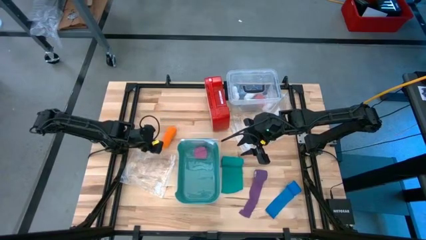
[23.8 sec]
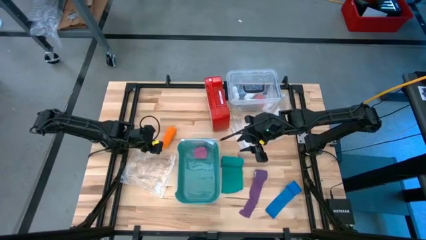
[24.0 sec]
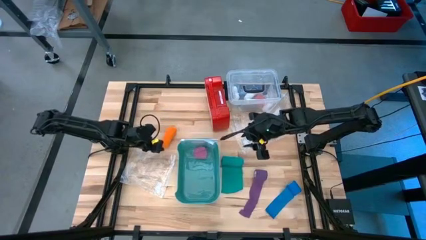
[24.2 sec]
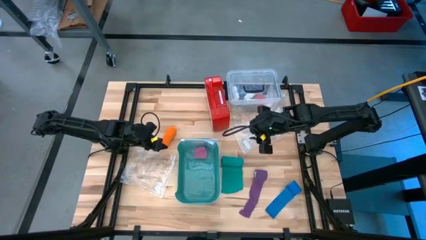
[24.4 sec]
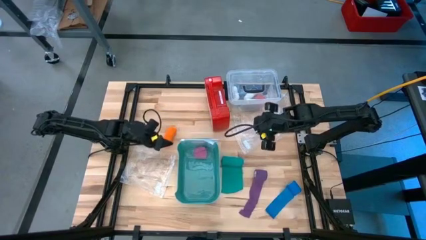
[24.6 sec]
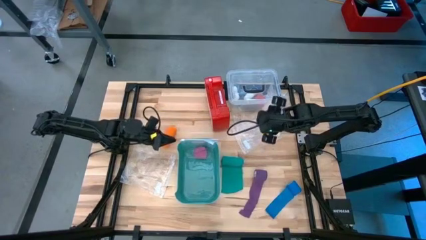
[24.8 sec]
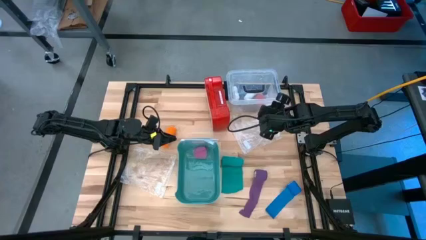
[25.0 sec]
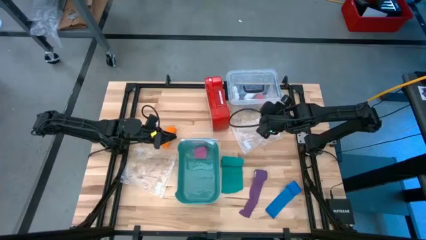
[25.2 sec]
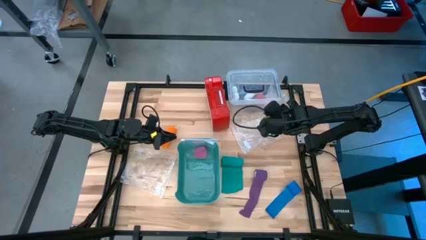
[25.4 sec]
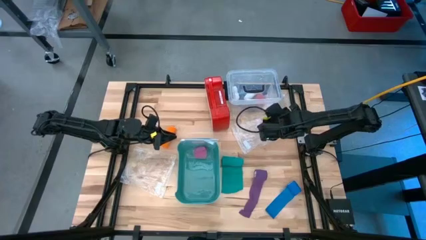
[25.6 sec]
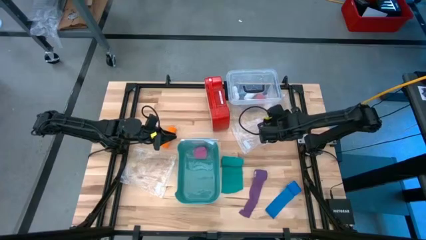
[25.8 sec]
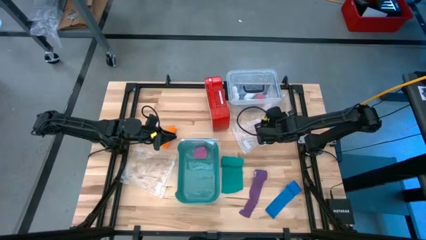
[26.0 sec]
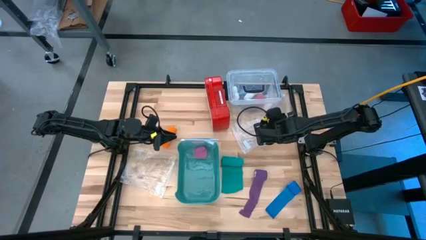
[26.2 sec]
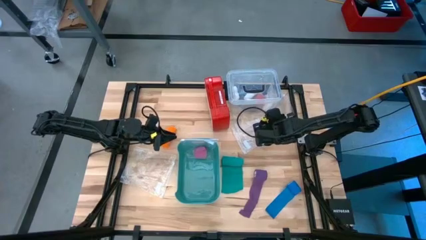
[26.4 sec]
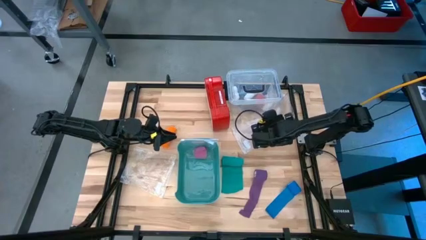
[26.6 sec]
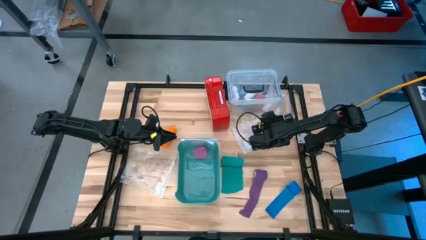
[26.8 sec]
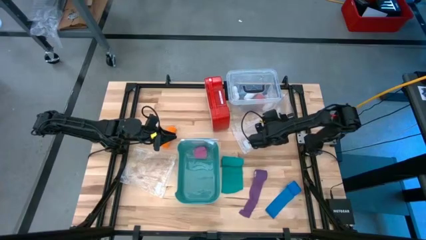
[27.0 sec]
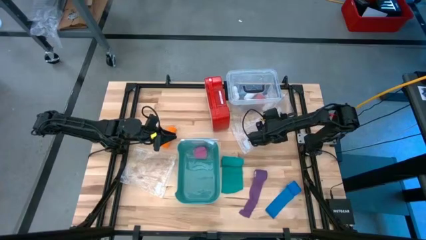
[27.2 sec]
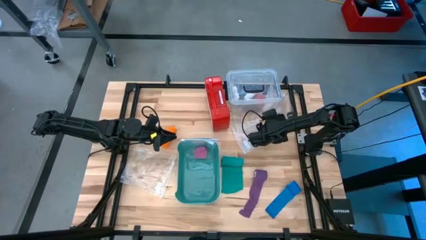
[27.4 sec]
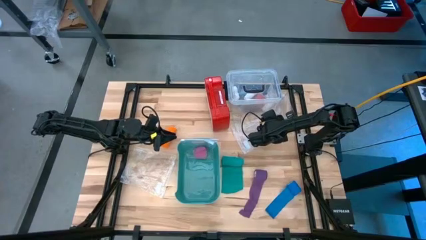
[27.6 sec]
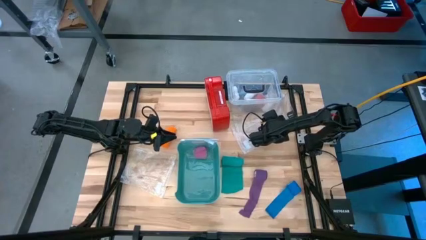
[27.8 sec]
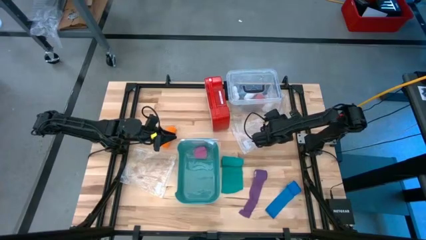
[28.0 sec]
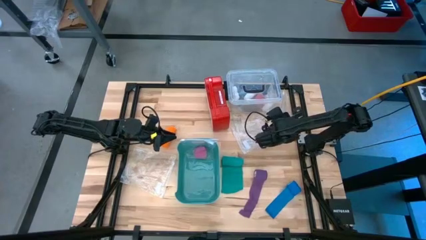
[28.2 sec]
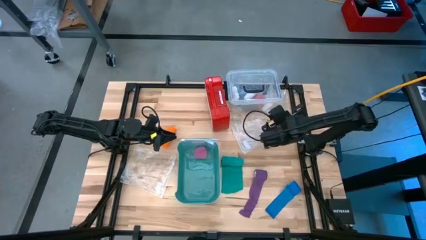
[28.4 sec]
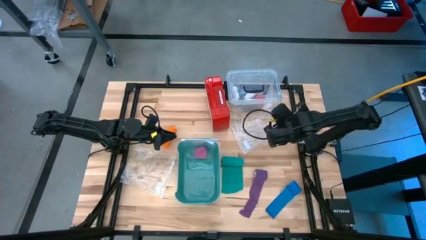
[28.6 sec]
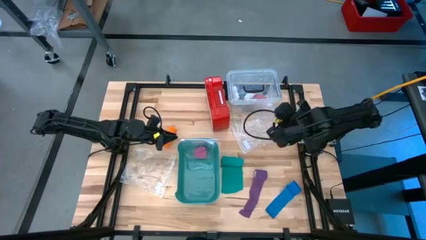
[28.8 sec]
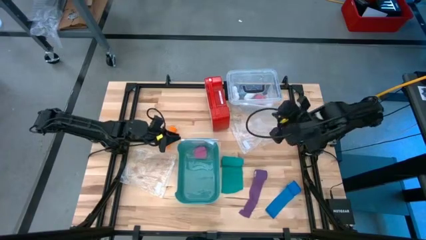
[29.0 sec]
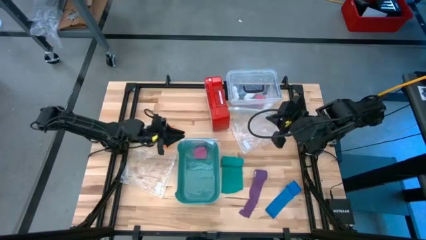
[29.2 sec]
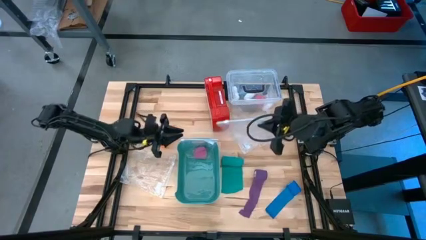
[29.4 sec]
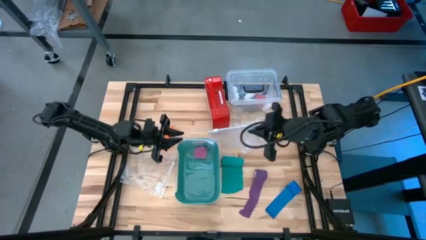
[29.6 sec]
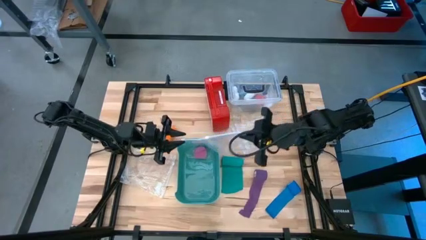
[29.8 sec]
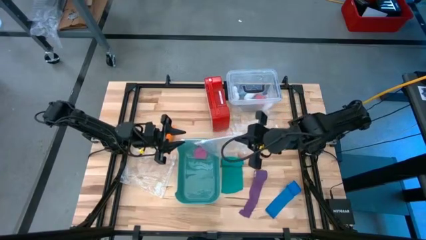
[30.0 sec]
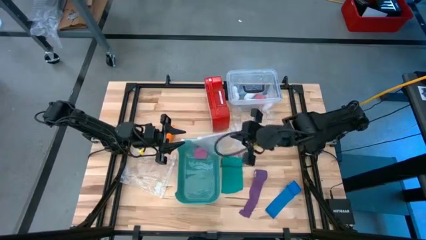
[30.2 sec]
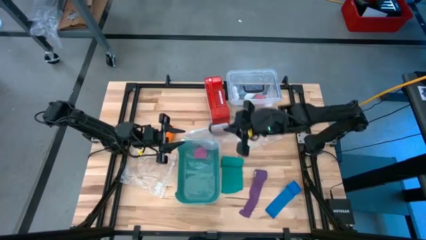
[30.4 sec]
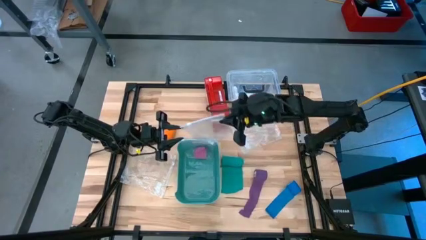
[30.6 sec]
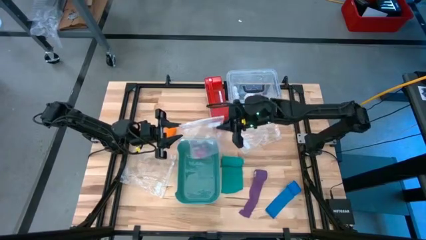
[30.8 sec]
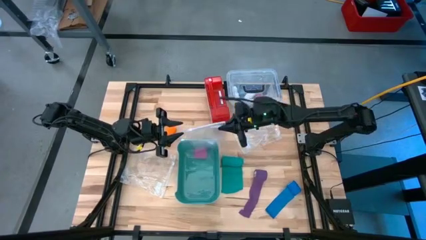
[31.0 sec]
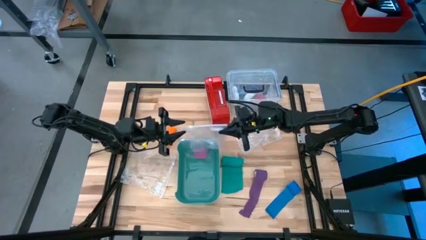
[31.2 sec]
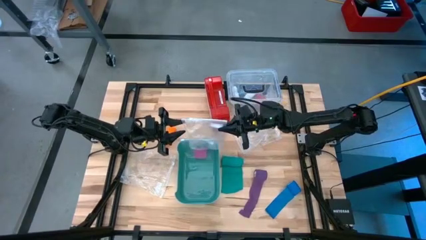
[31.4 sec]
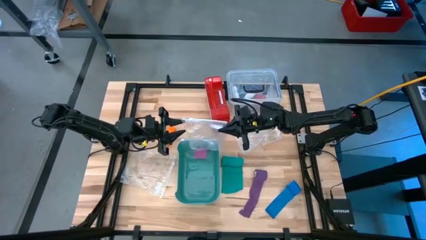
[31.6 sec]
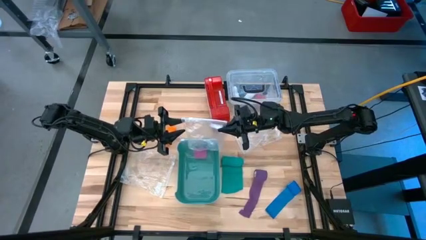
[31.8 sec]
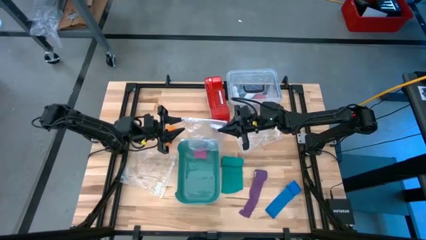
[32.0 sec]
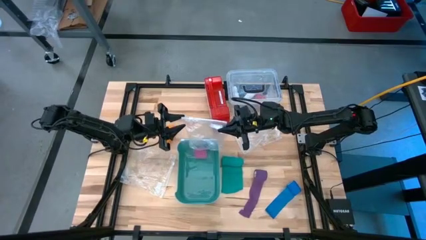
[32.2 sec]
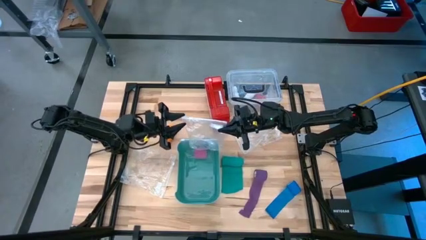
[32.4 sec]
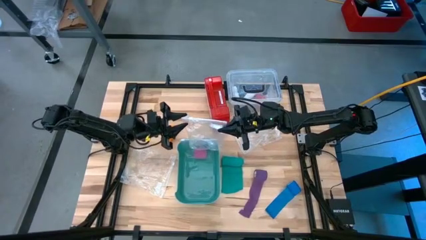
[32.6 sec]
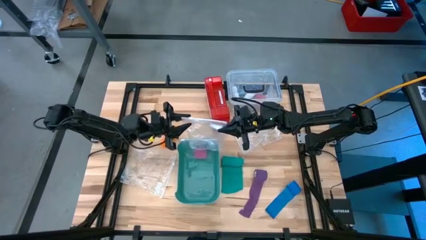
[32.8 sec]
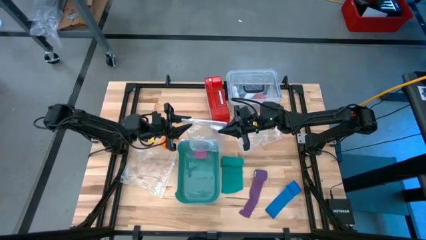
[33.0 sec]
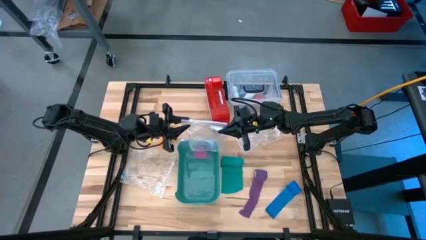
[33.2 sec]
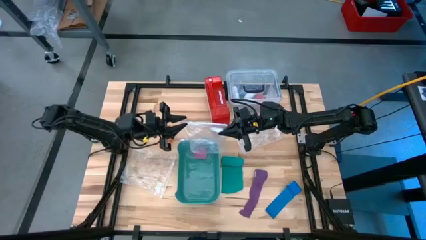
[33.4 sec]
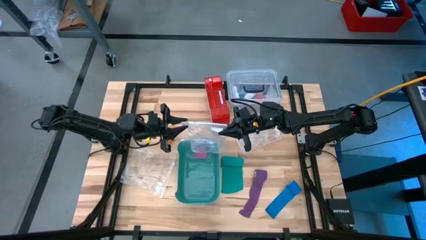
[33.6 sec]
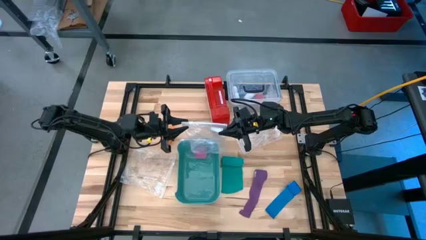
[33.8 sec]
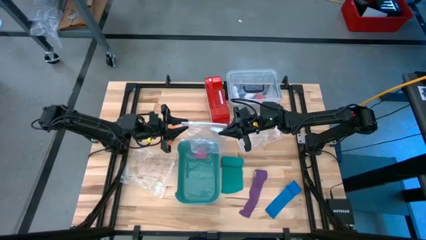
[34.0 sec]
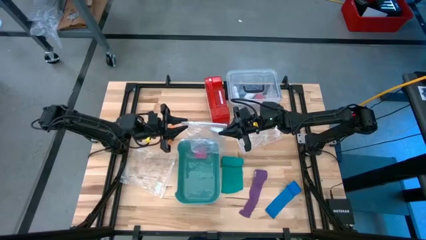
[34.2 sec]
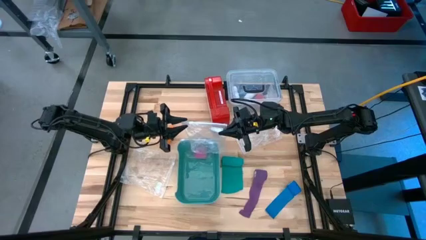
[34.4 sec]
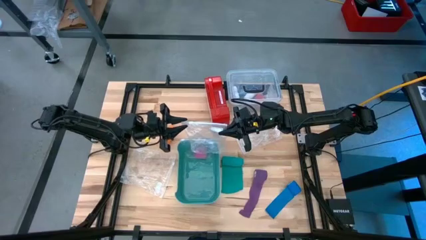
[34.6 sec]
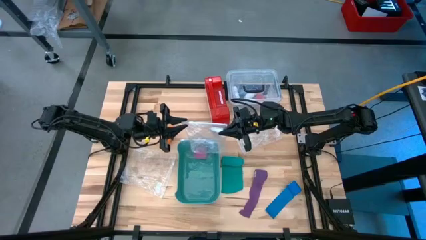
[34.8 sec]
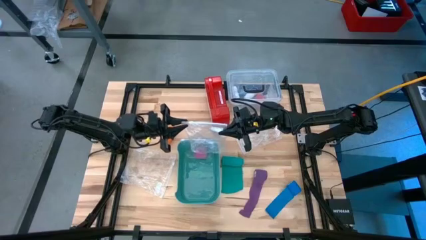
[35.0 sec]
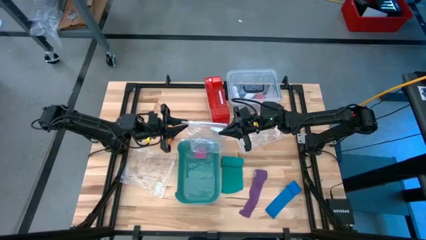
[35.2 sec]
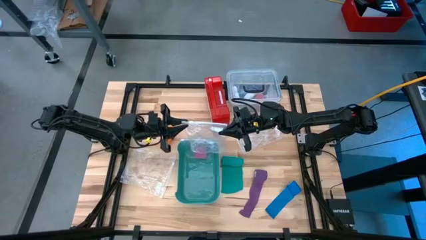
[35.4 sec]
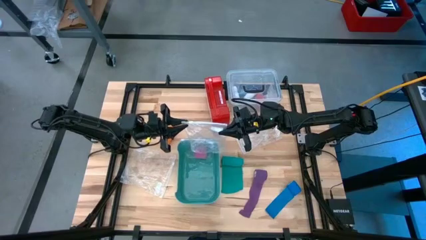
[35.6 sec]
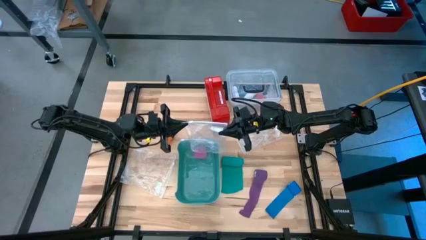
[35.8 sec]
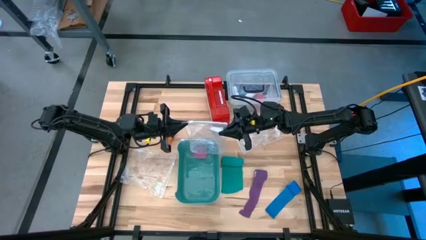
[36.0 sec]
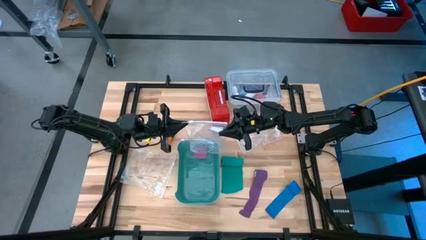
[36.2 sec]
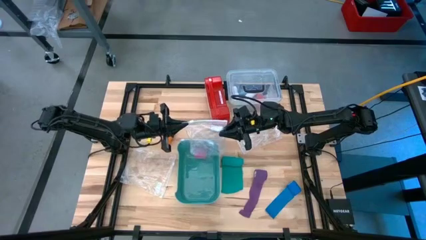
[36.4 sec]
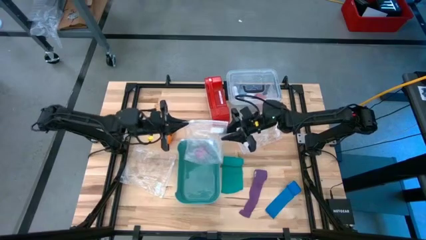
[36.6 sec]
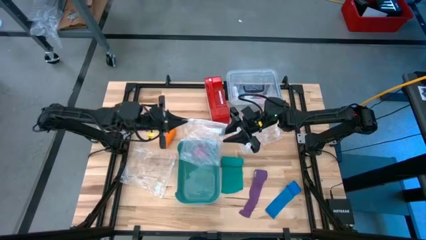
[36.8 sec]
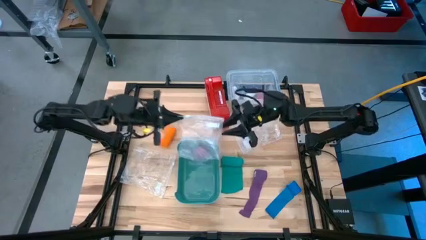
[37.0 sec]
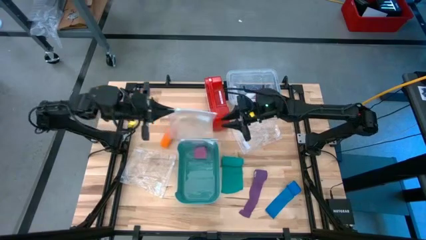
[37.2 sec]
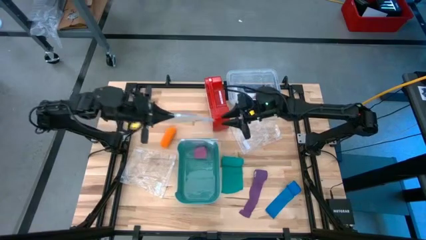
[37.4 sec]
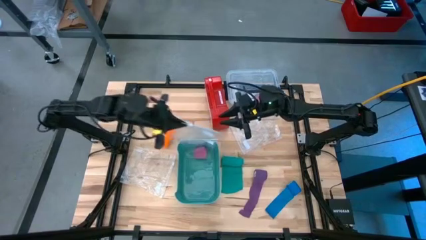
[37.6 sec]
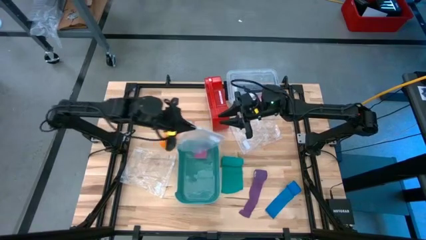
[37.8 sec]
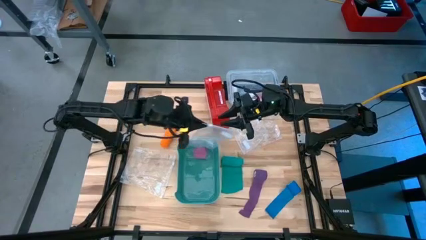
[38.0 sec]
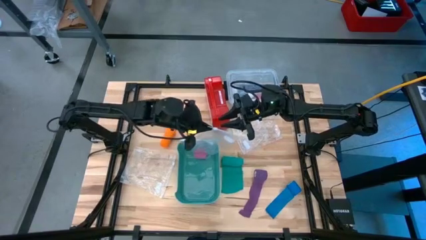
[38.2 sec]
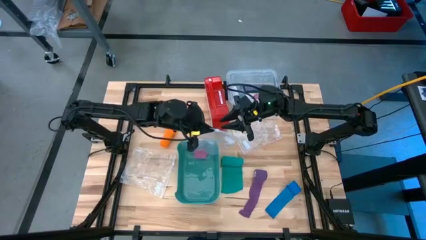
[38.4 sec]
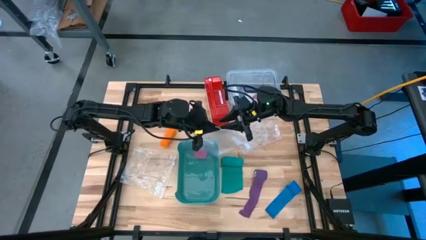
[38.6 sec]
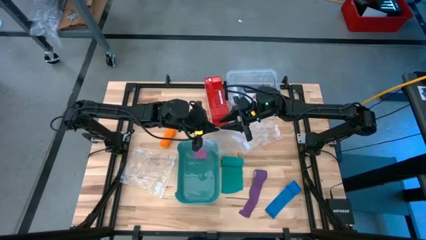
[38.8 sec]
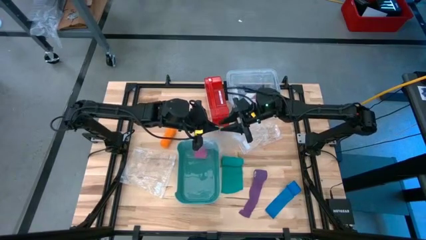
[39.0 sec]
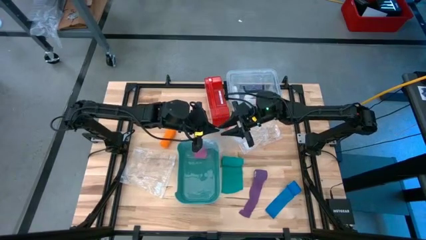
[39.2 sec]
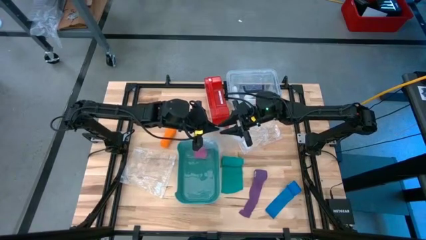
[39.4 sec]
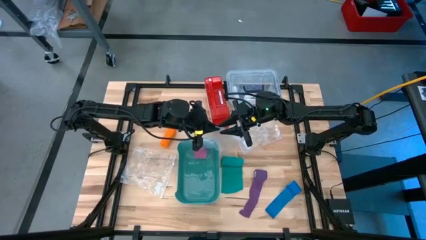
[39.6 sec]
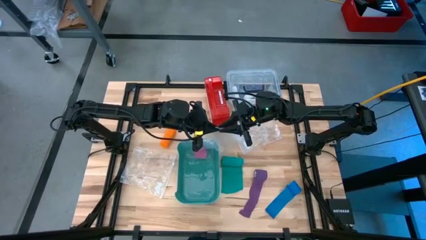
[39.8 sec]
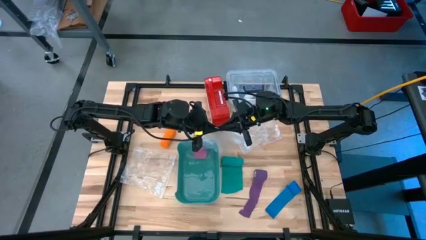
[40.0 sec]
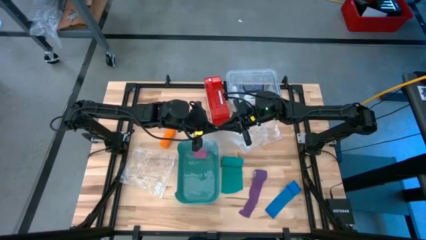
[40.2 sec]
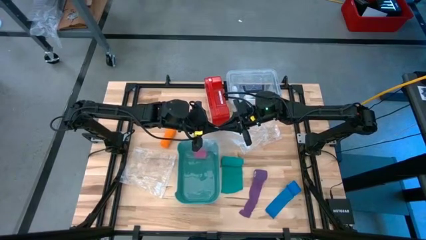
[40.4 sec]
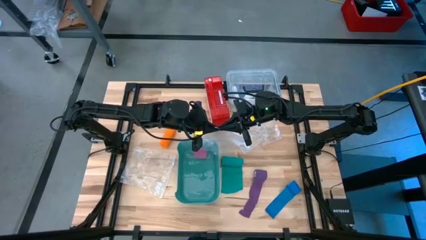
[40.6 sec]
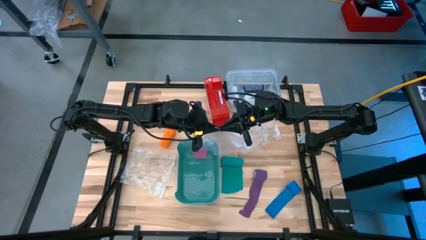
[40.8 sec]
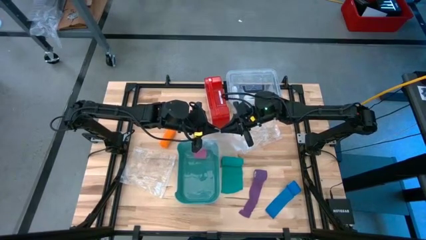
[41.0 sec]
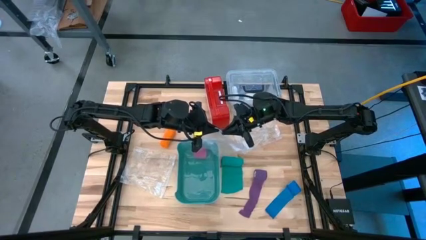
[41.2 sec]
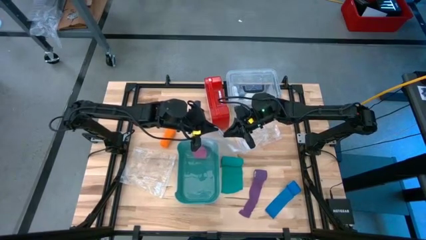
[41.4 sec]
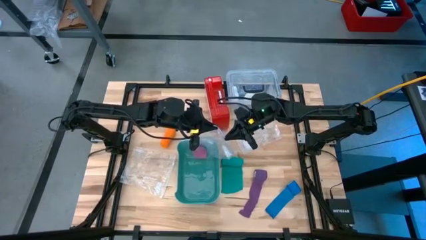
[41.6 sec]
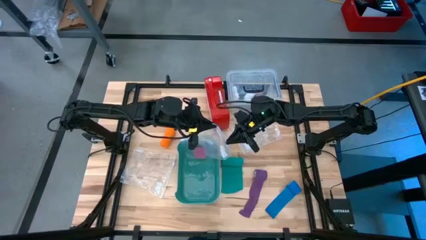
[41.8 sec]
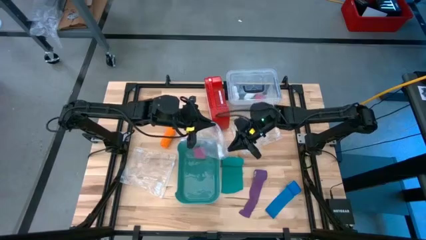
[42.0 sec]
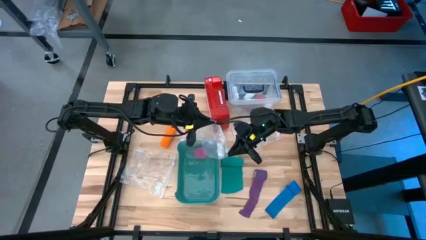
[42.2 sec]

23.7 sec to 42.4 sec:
Task: Roll bandage
Open the transparent zip bag
